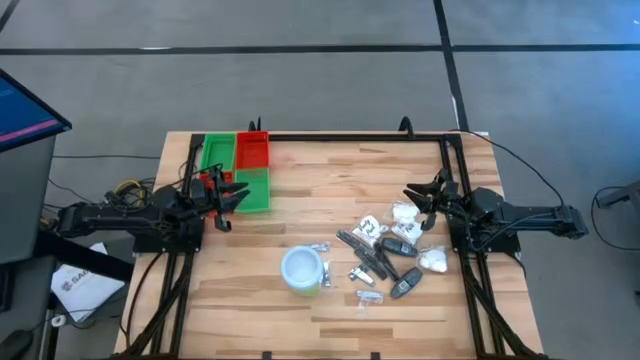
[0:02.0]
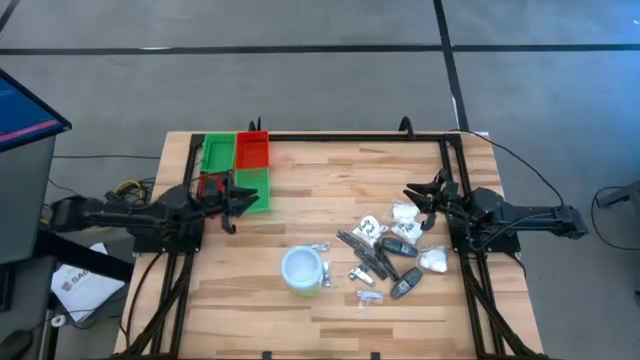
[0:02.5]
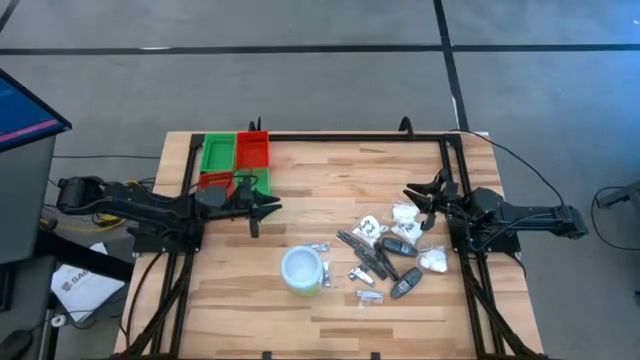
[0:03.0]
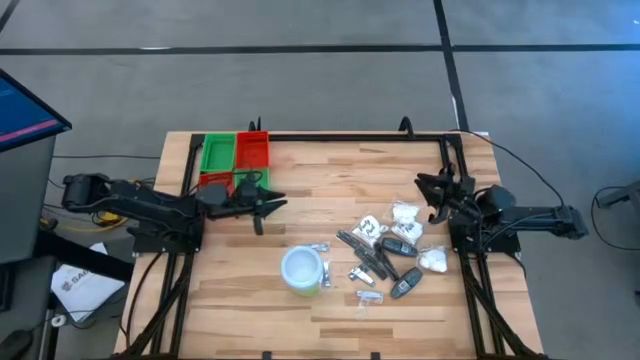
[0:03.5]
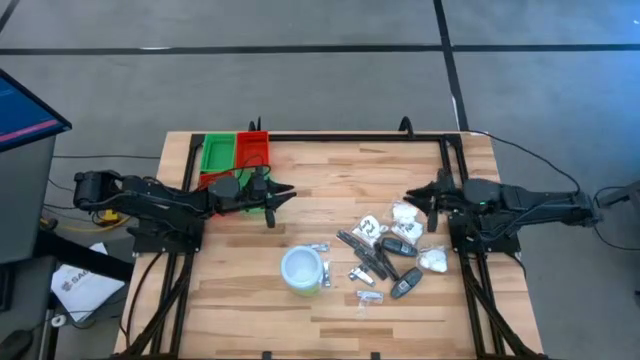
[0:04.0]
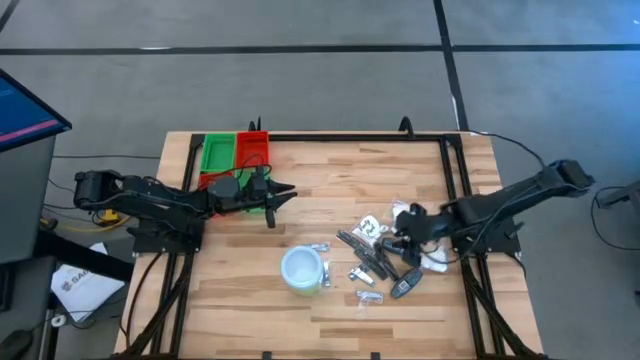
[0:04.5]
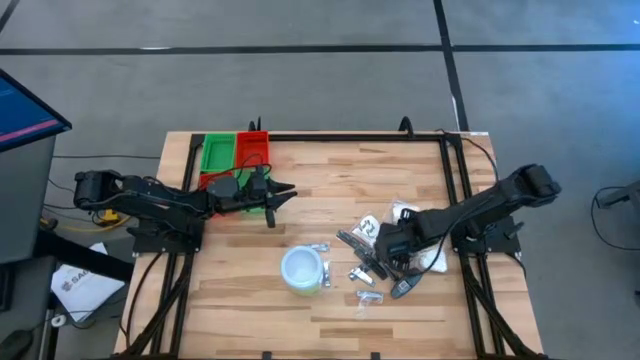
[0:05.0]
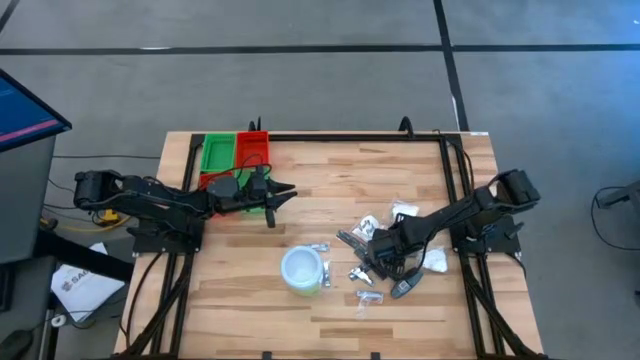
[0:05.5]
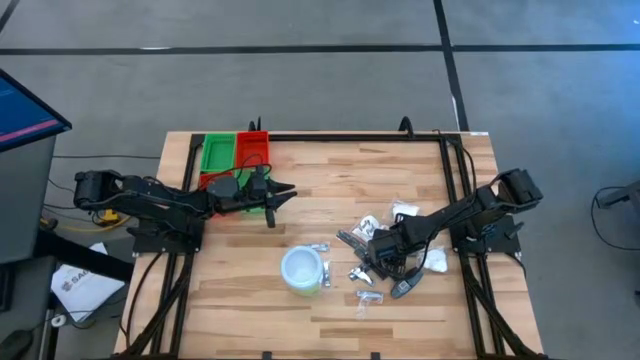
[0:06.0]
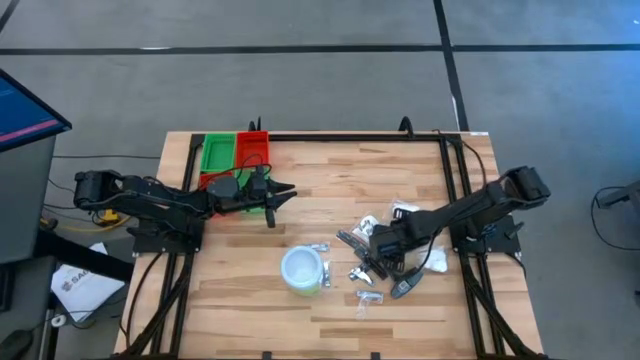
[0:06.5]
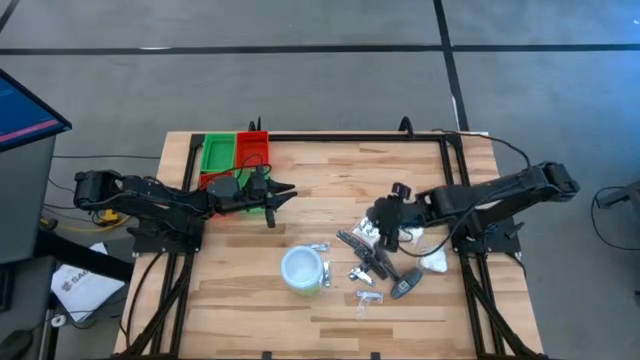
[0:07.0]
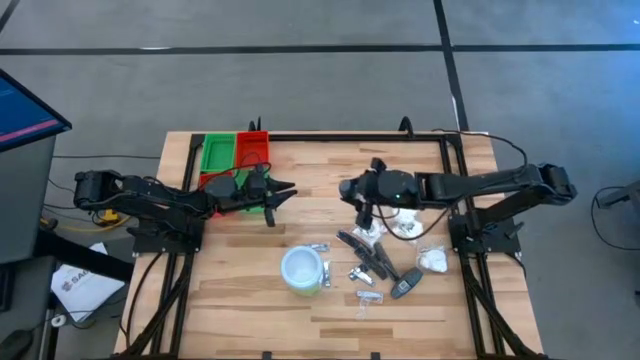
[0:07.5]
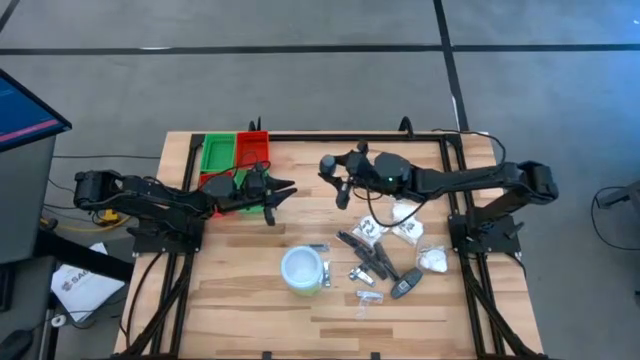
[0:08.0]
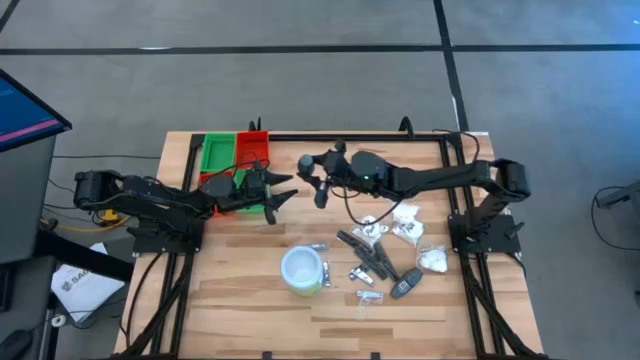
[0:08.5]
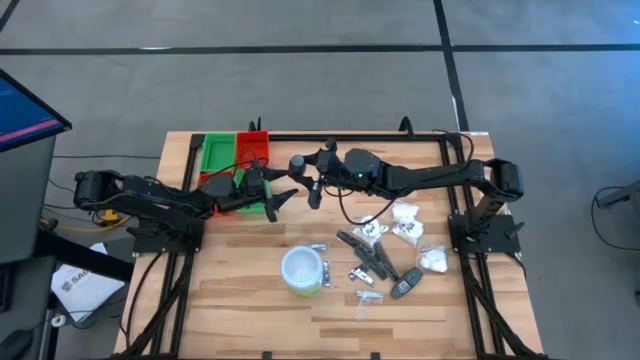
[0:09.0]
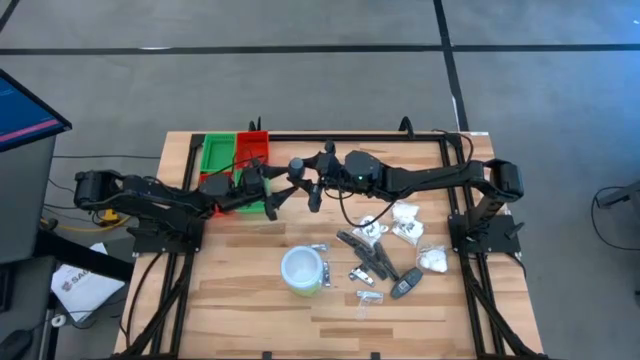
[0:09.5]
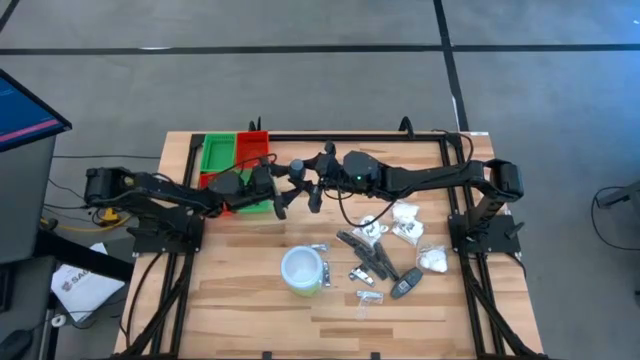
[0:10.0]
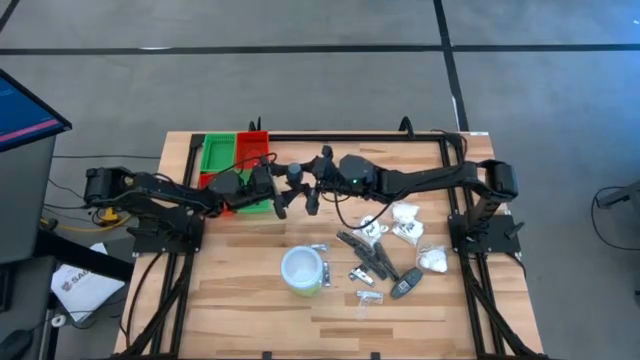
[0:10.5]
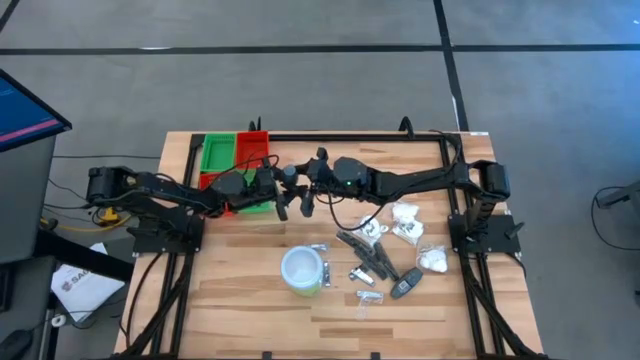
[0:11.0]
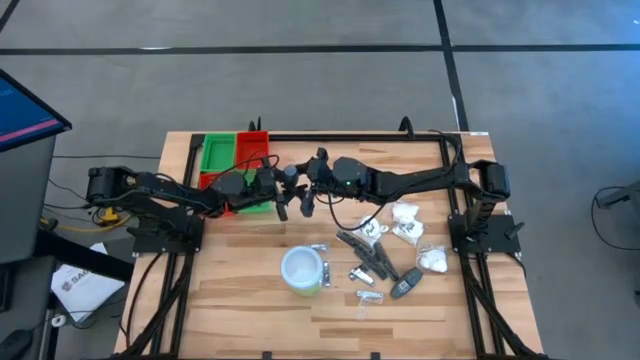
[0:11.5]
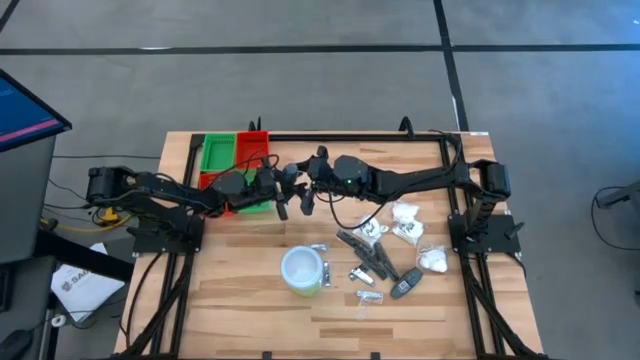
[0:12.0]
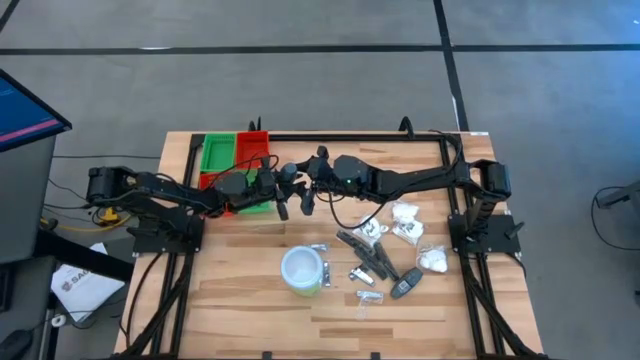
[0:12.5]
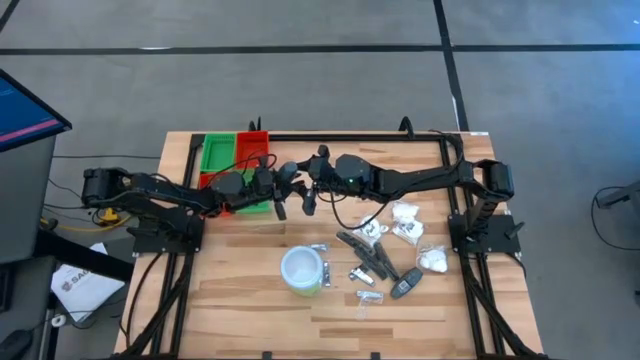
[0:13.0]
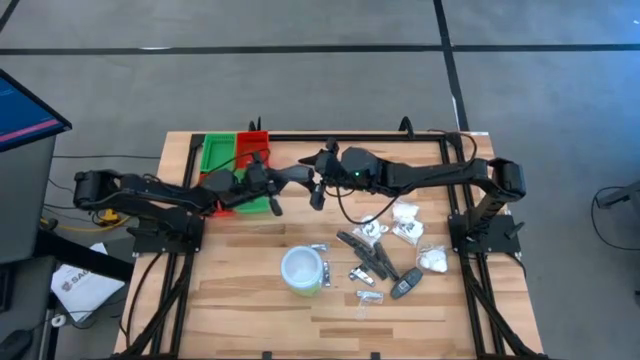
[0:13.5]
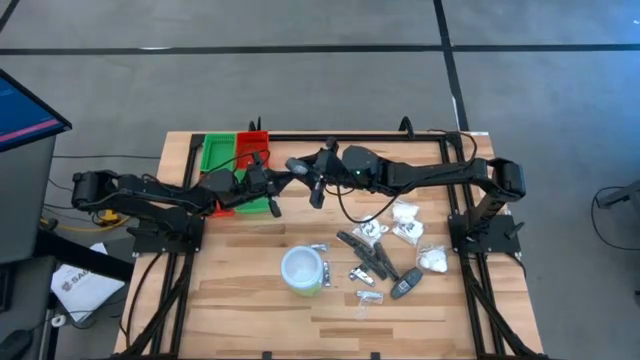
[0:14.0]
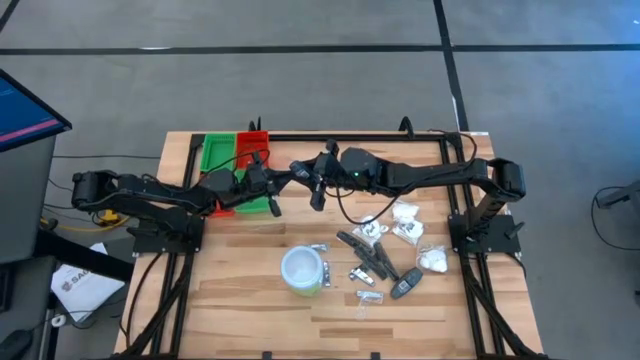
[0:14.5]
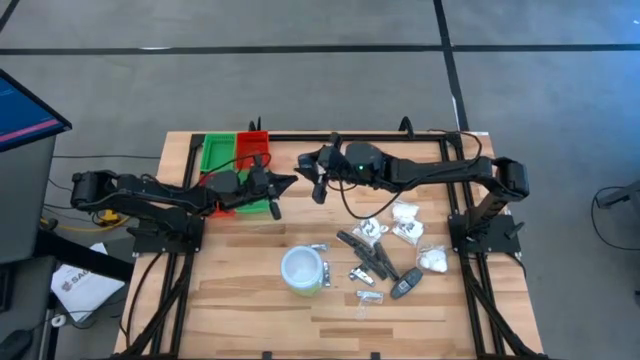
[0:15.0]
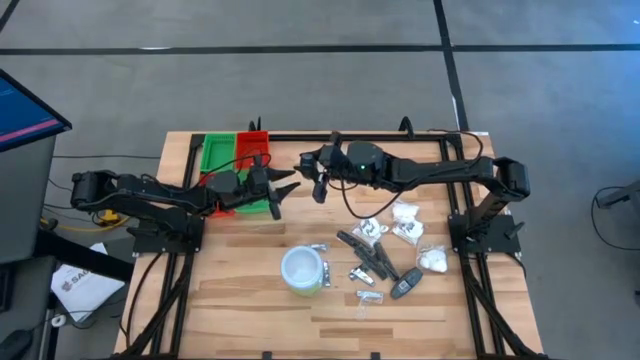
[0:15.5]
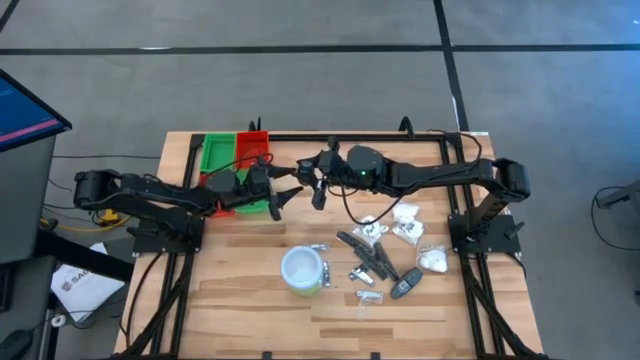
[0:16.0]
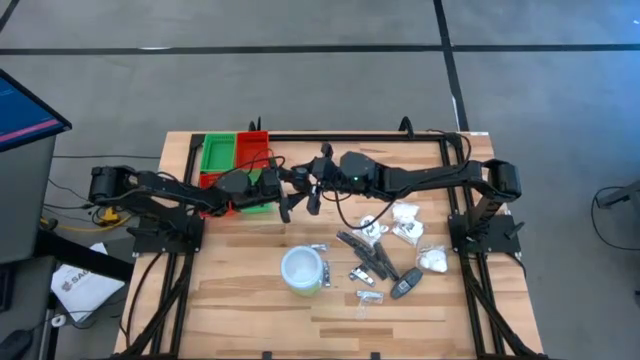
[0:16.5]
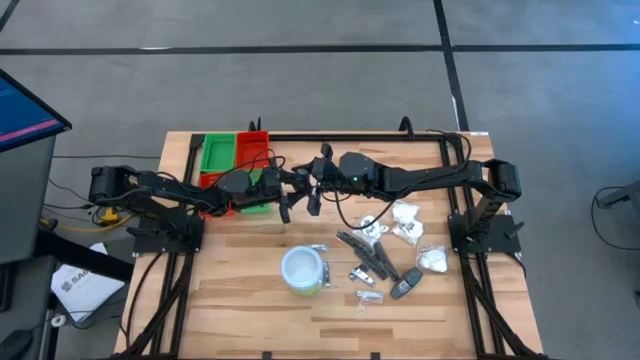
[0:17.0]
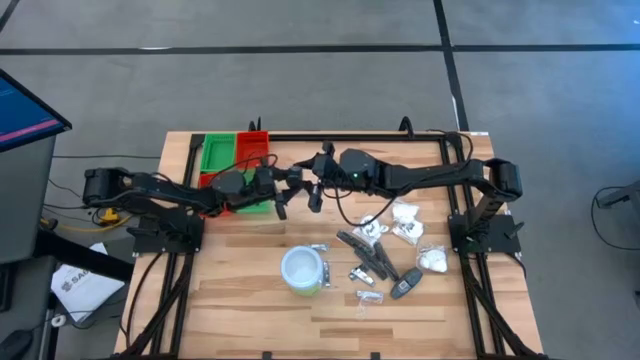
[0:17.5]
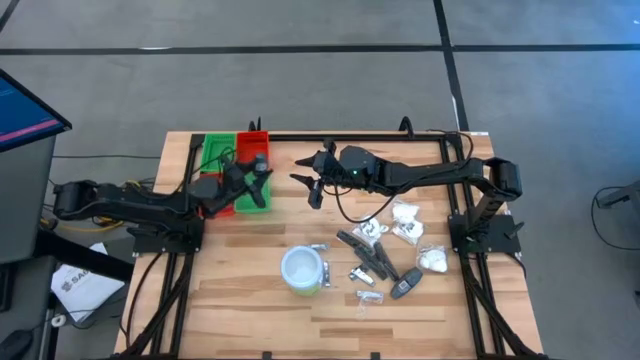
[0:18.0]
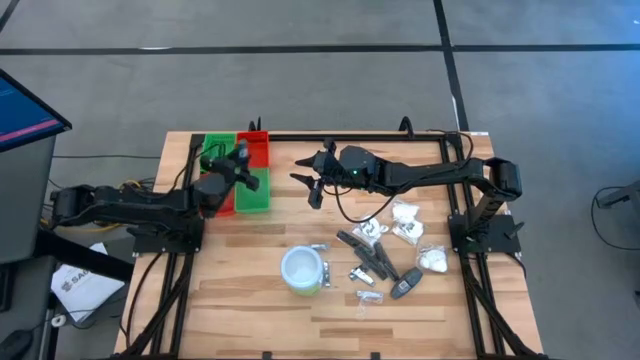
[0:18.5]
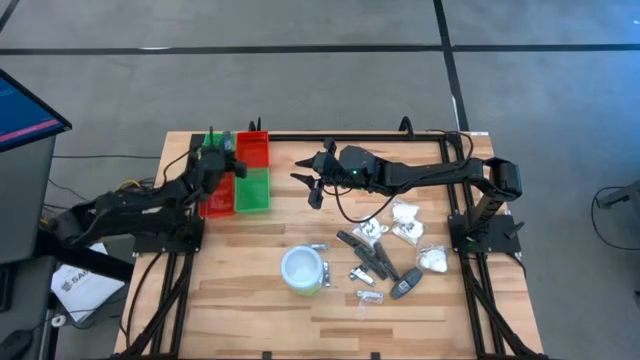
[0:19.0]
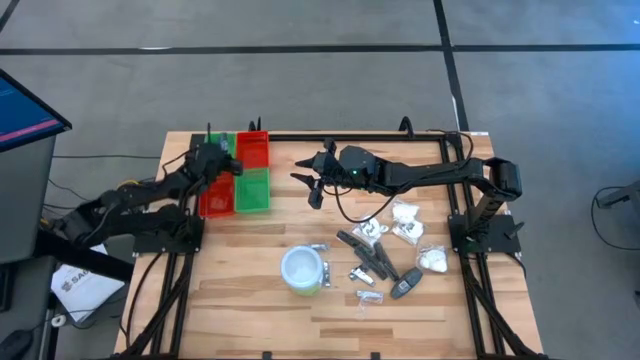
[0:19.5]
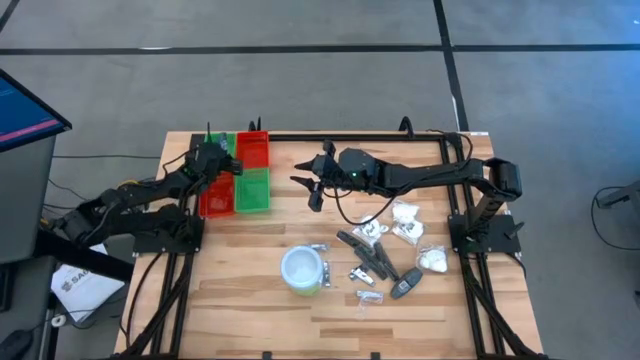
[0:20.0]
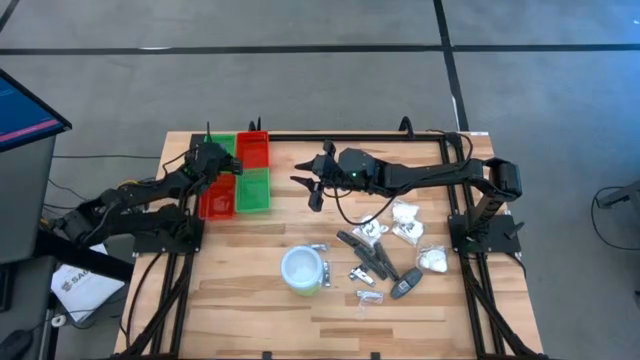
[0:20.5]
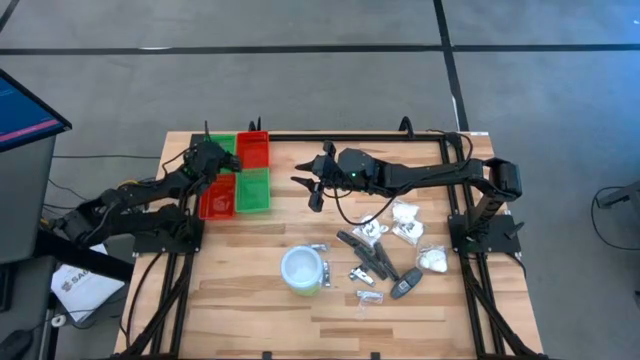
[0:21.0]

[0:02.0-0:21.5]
Task: Pick & Place Travel size toiletries
Put the gray deodorant into the top green bin
